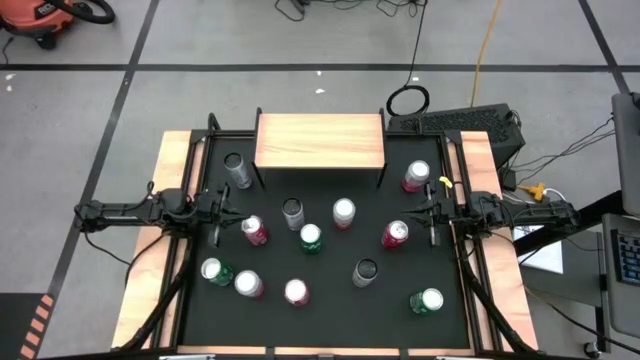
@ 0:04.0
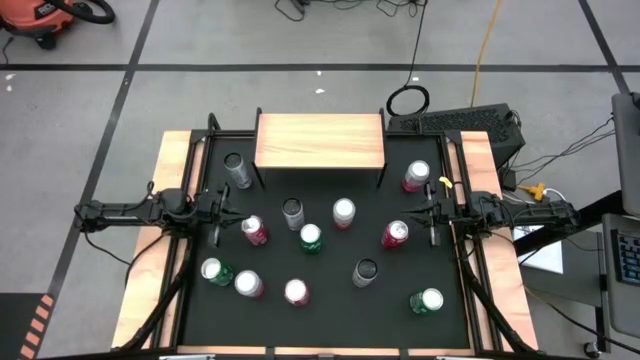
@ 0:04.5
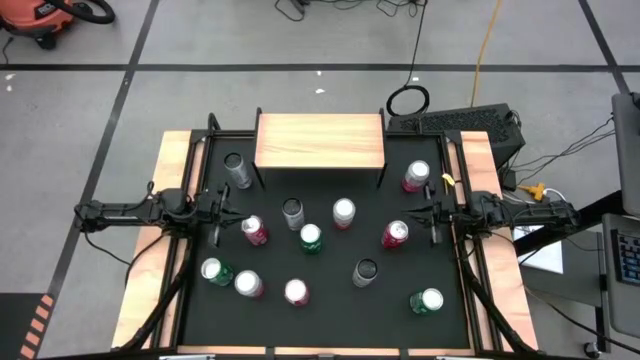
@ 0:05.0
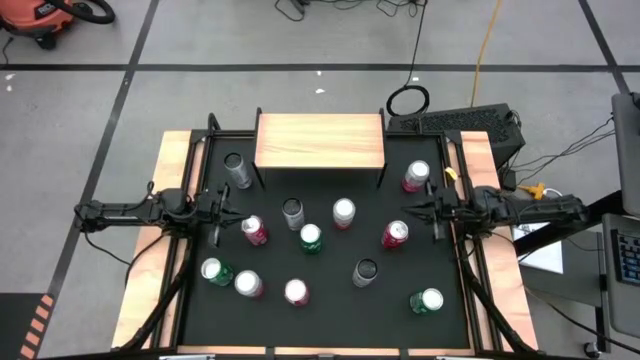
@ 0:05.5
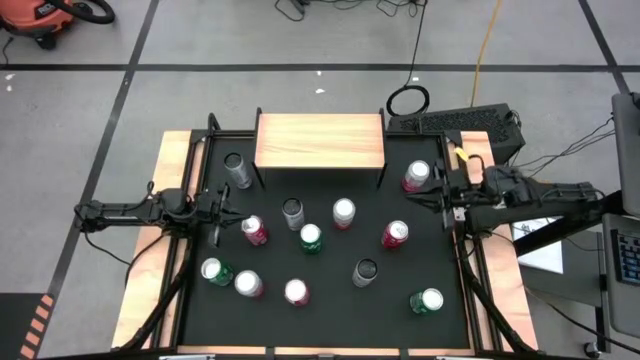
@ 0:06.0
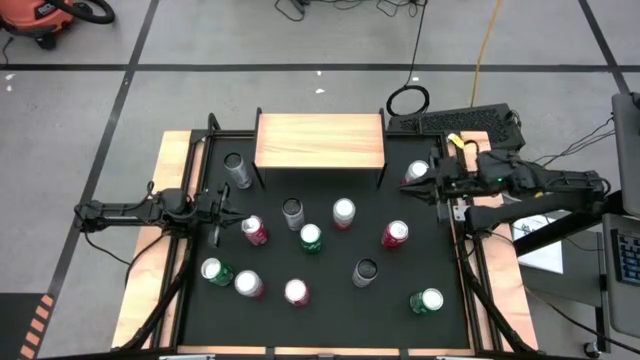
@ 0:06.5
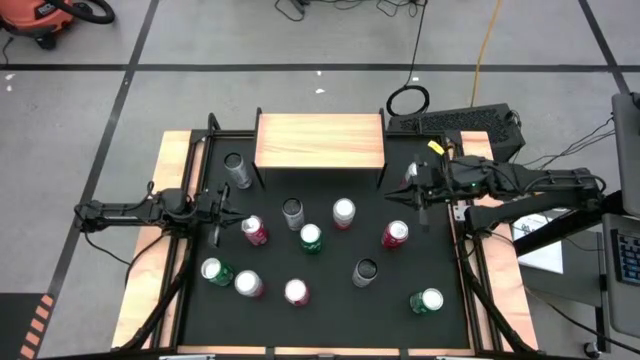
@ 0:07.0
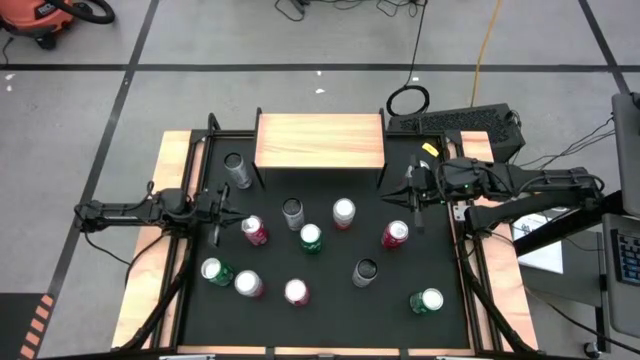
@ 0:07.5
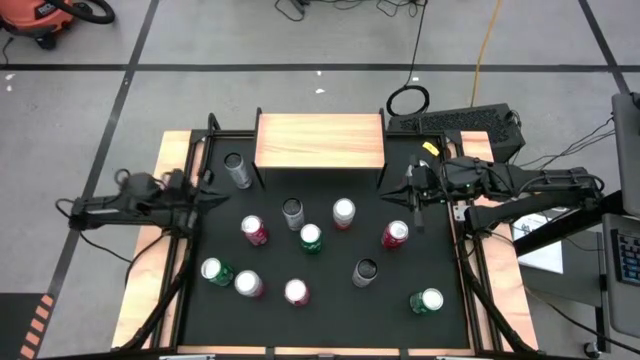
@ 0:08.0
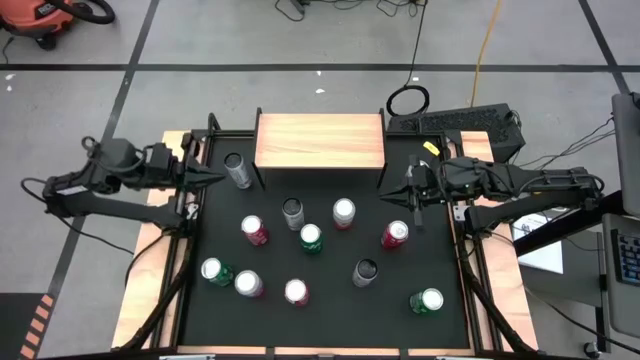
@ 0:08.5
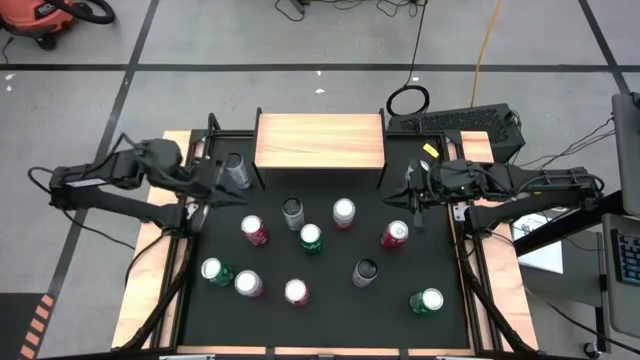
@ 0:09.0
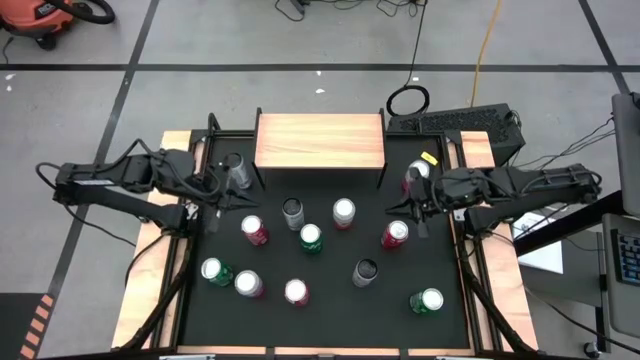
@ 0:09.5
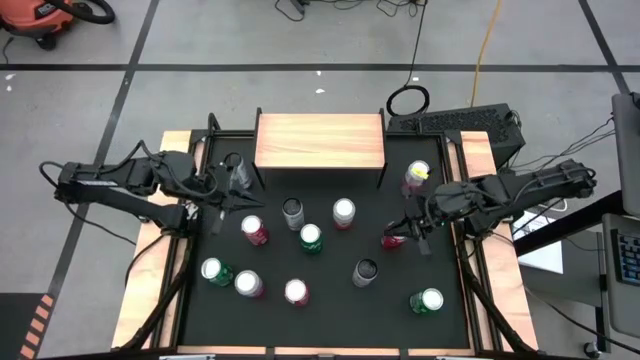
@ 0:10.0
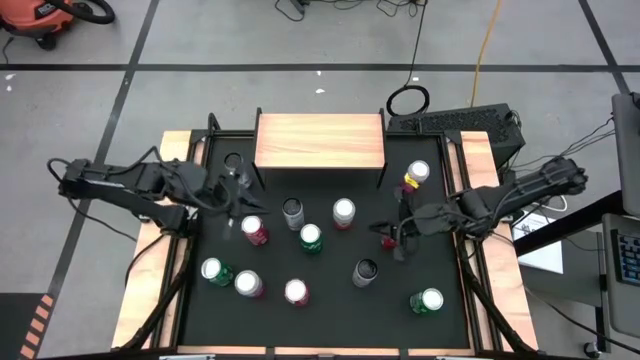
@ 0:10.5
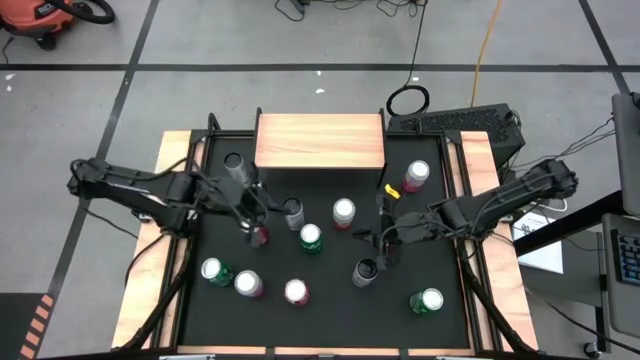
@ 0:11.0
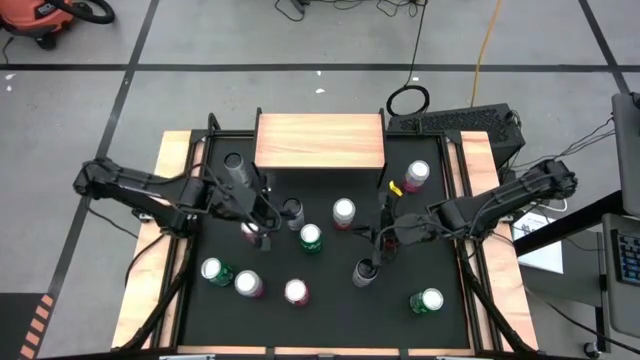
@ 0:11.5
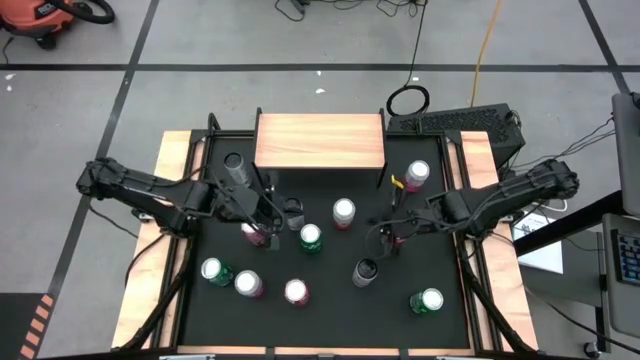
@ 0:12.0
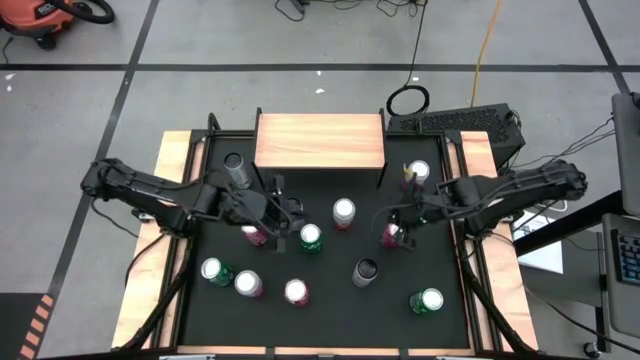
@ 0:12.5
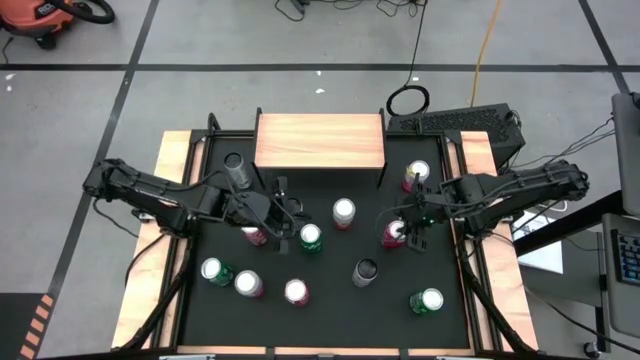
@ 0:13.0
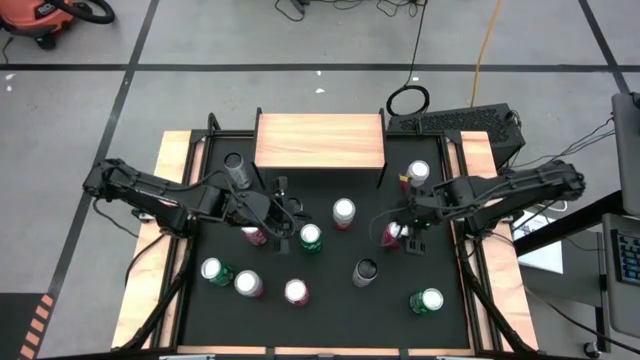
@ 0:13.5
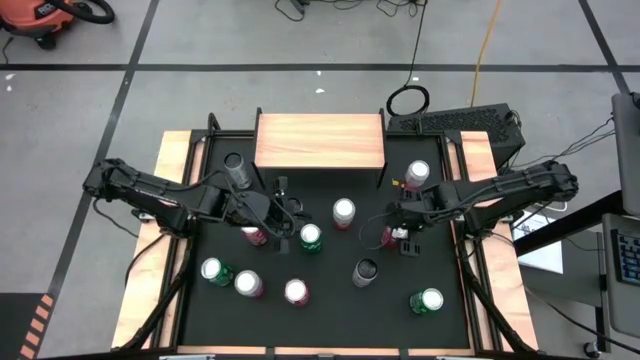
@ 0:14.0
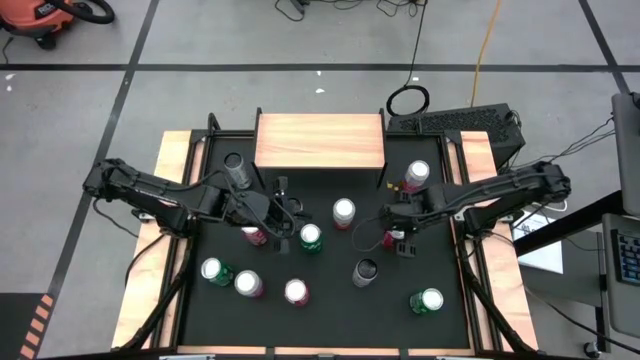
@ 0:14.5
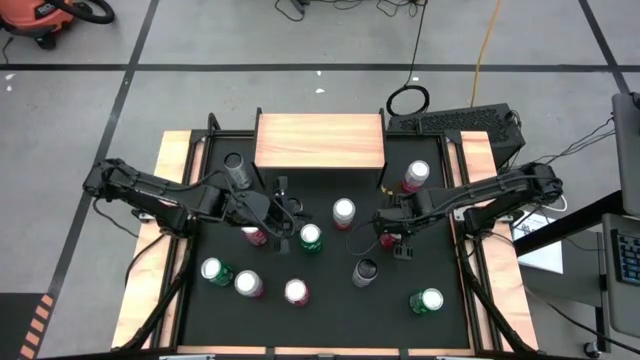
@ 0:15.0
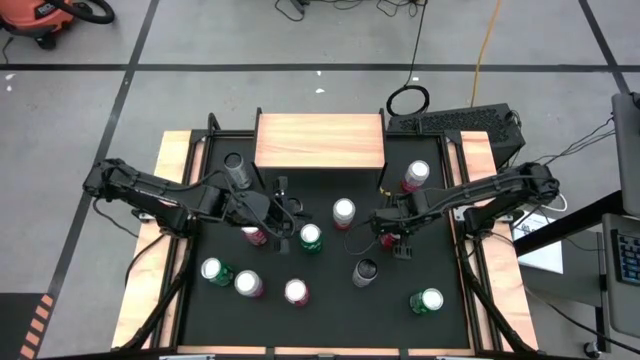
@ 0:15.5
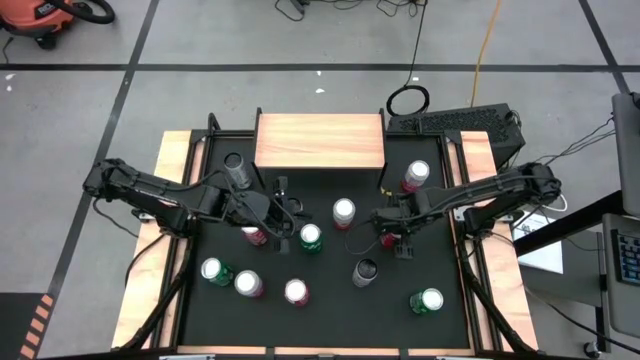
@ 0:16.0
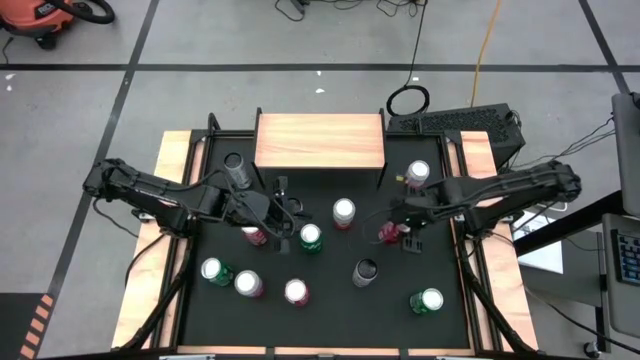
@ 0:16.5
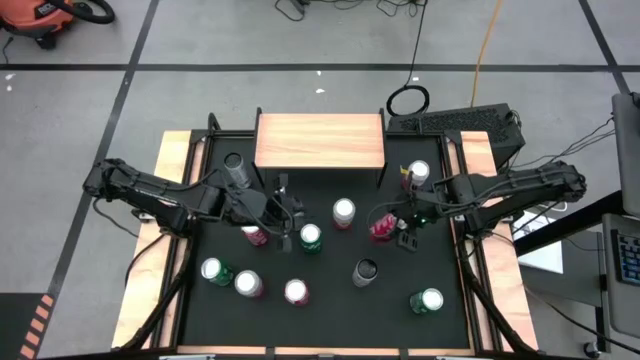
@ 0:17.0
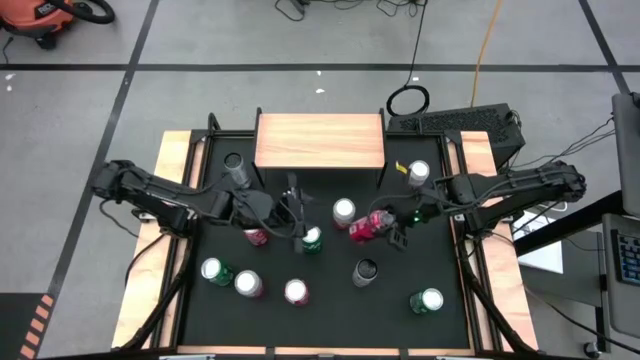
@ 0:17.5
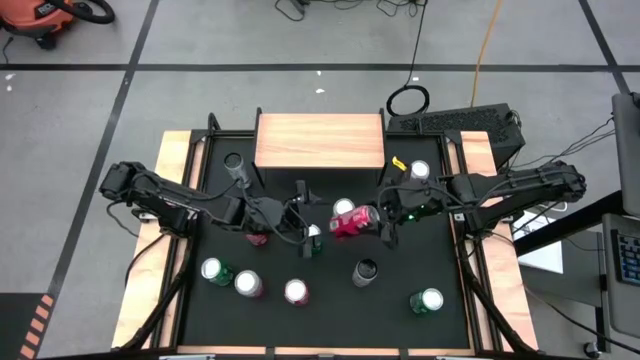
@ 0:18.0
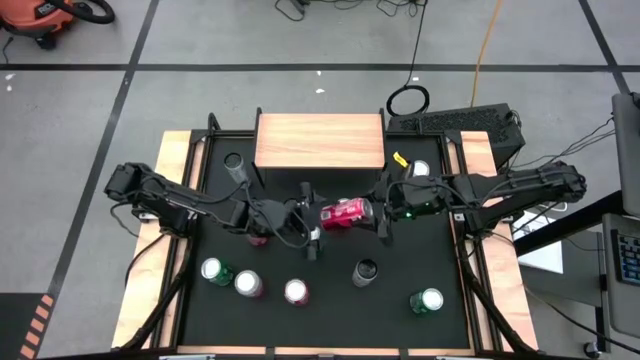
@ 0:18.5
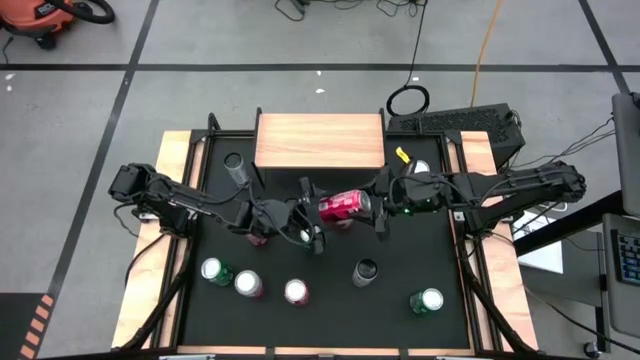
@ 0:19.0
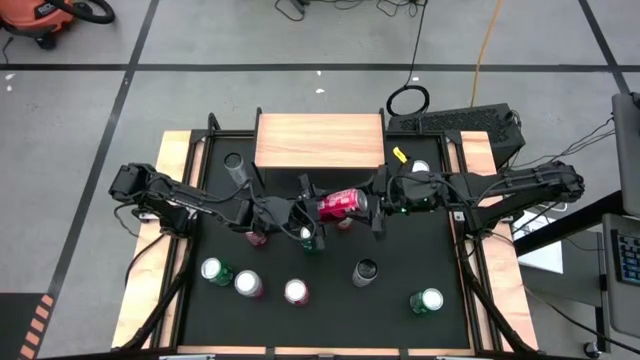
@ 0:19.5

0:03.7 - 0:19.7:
Task: Place canned beverage on shelf
Put the top right red soda can on the shelf

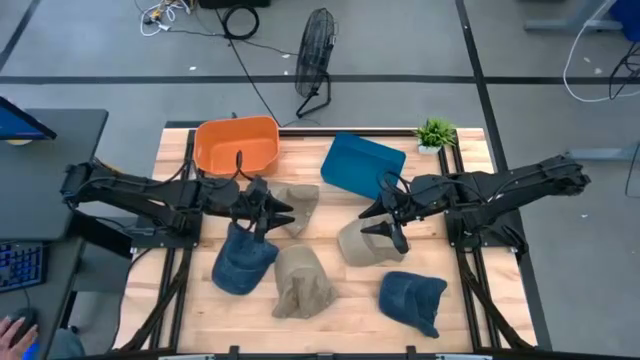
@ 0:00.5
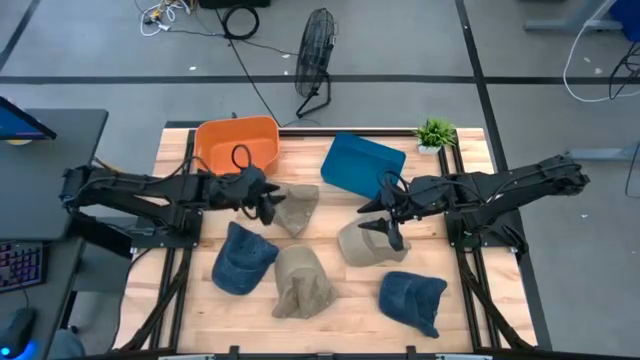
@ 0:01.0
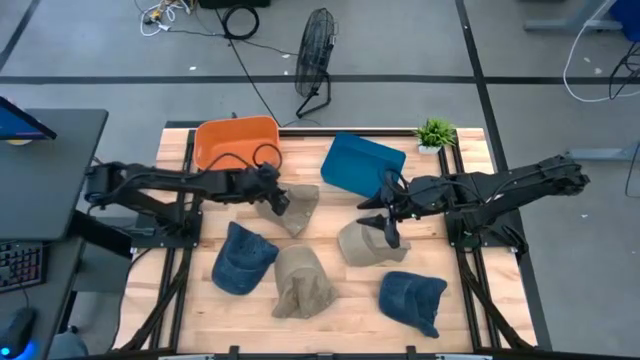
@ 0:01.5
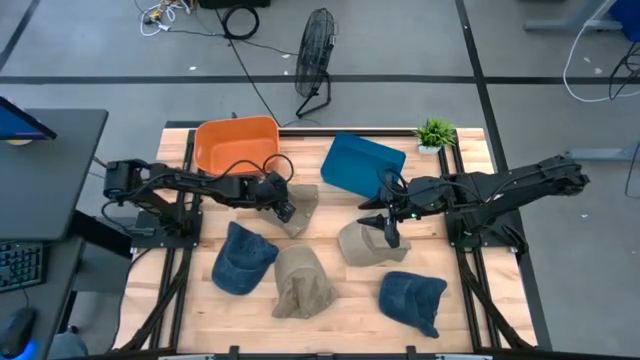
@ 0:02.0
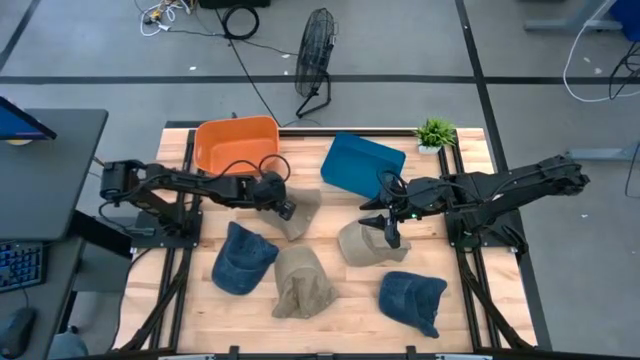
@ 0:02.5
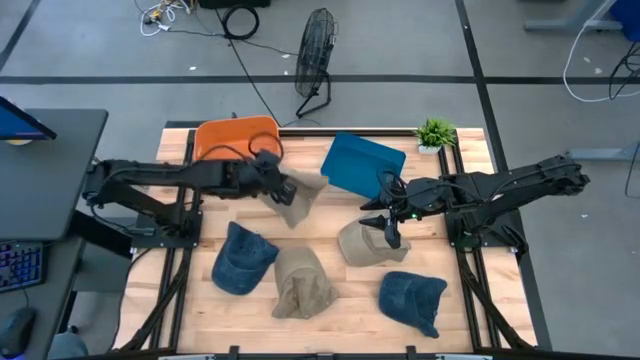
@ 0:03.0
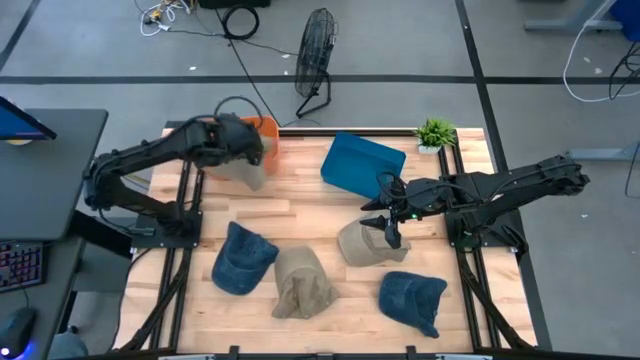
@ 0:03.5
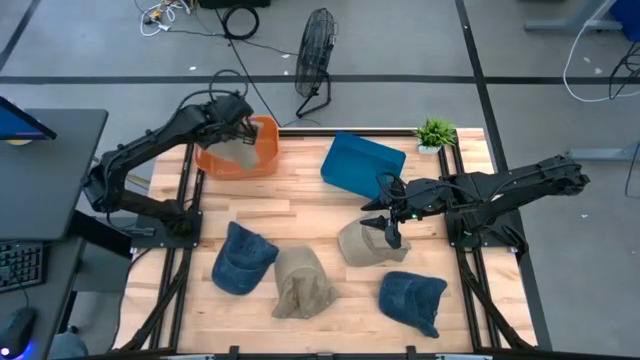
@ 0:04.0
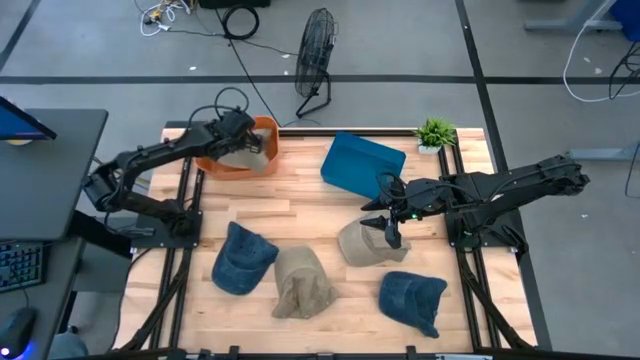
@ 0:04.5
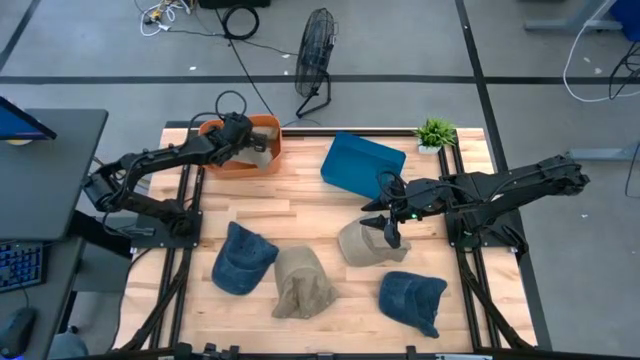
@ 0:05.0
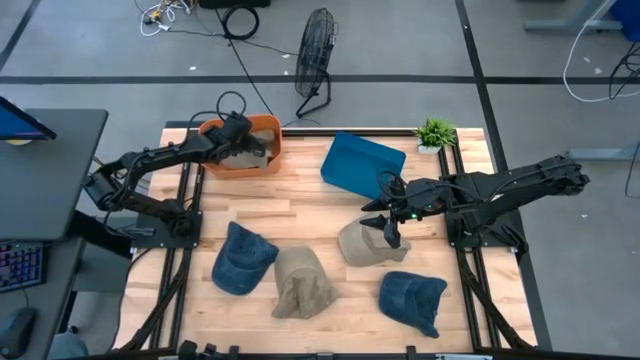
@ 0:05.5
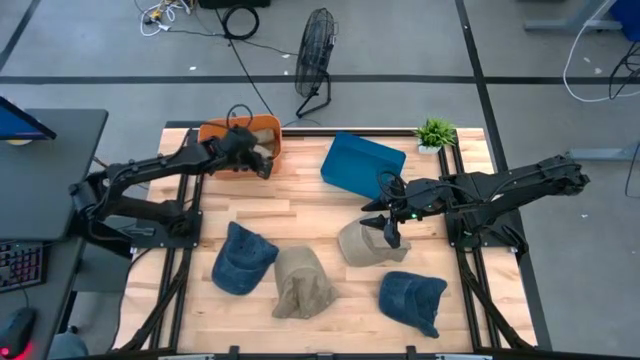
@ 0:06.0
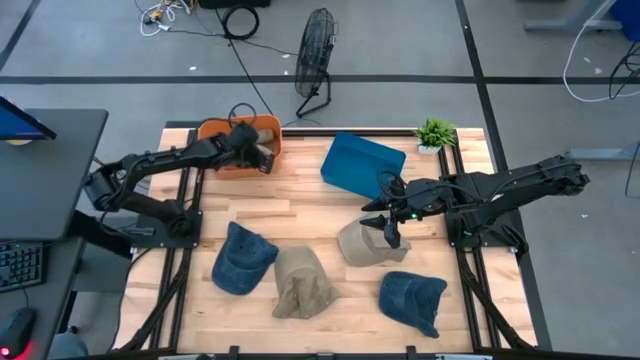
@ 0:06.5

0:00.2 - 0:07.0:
Task: Pick & Place hat
Put the top brown cap into the orange bin
